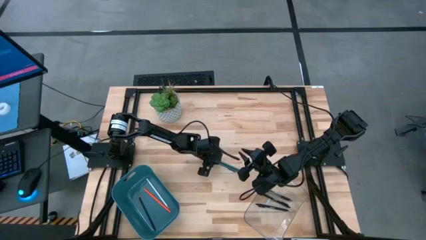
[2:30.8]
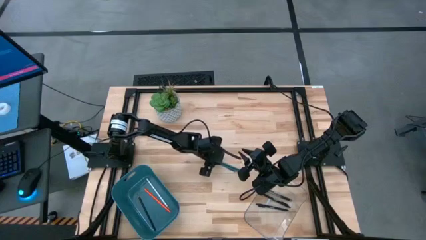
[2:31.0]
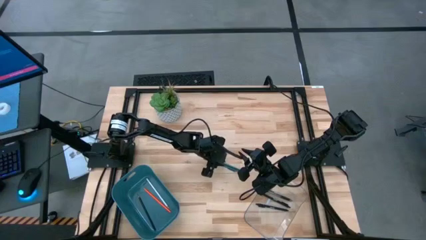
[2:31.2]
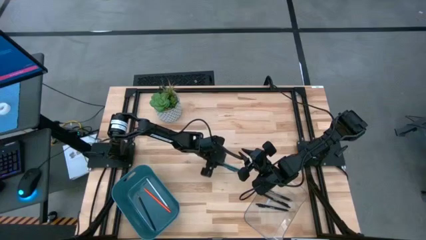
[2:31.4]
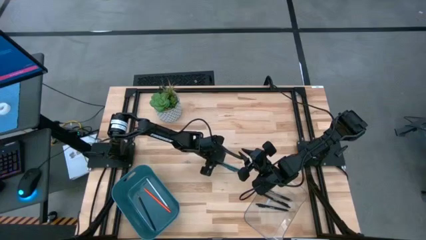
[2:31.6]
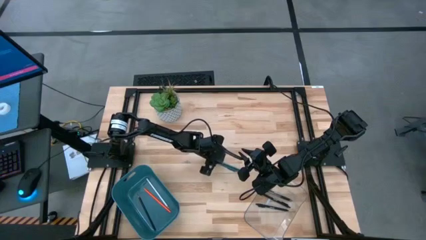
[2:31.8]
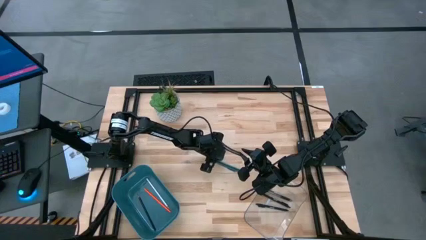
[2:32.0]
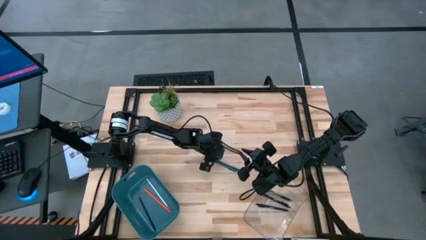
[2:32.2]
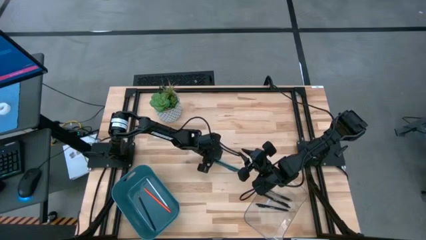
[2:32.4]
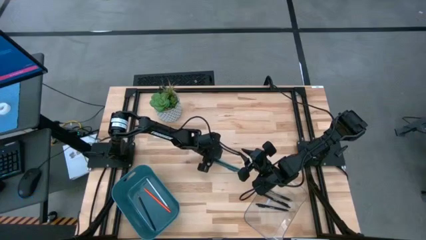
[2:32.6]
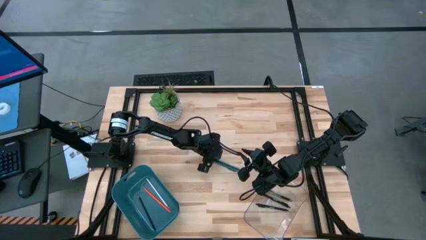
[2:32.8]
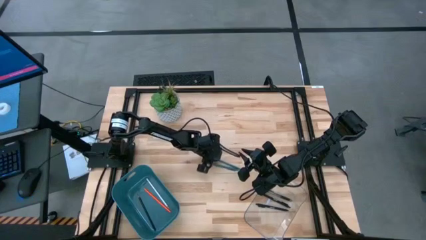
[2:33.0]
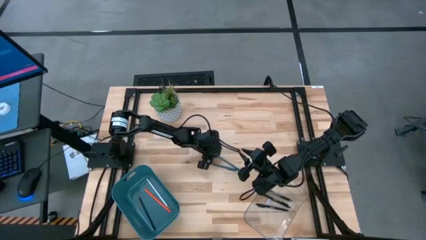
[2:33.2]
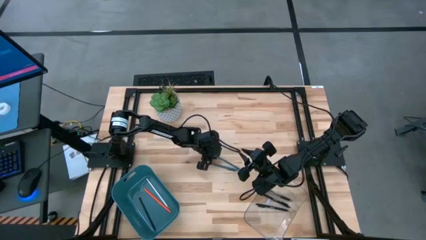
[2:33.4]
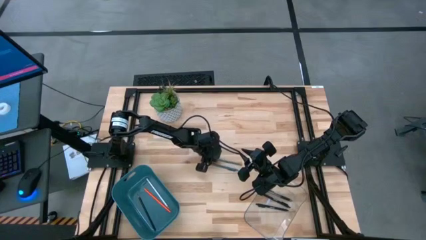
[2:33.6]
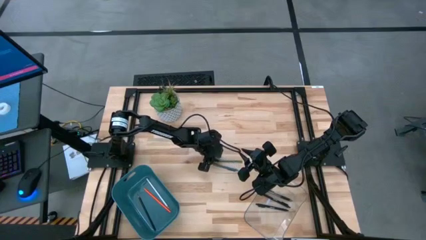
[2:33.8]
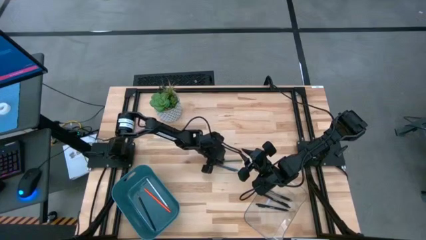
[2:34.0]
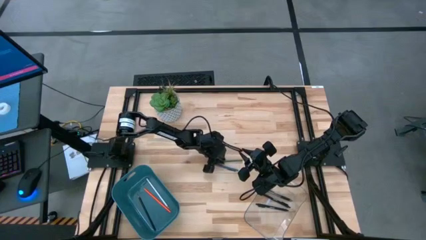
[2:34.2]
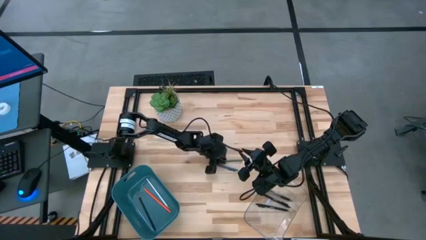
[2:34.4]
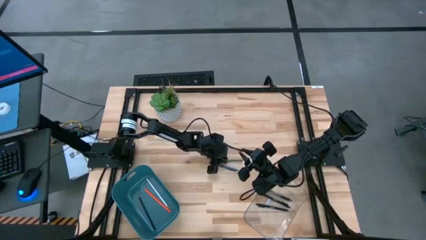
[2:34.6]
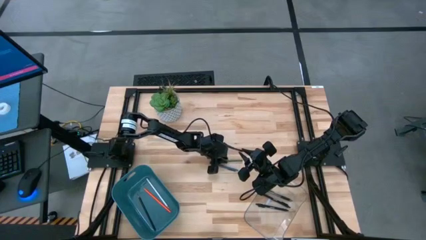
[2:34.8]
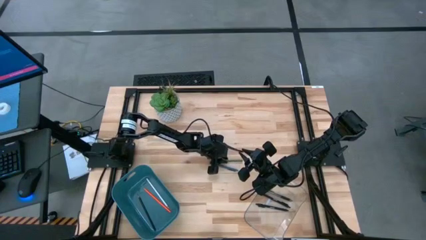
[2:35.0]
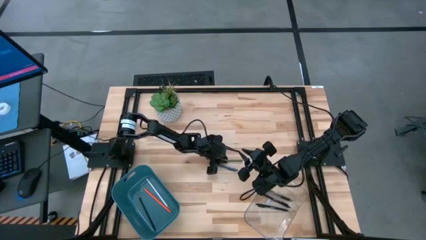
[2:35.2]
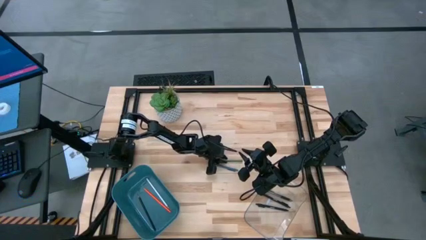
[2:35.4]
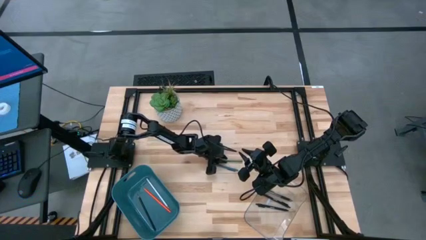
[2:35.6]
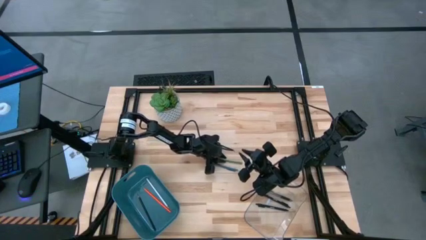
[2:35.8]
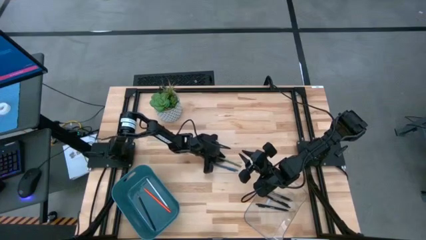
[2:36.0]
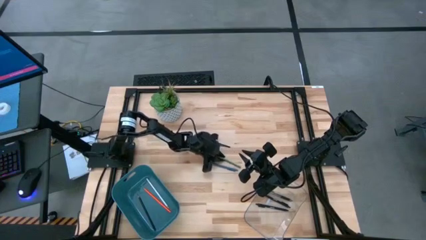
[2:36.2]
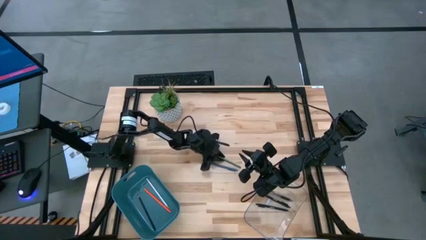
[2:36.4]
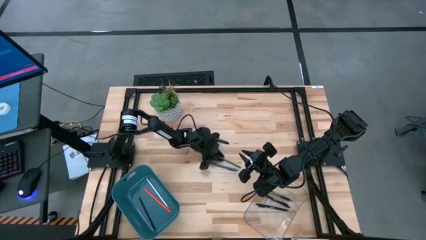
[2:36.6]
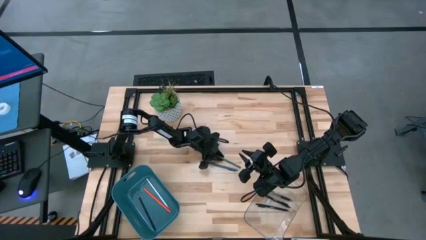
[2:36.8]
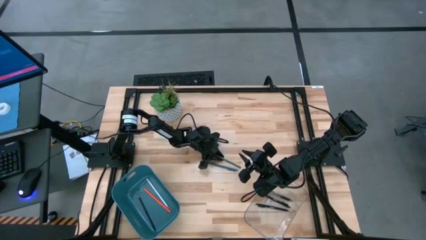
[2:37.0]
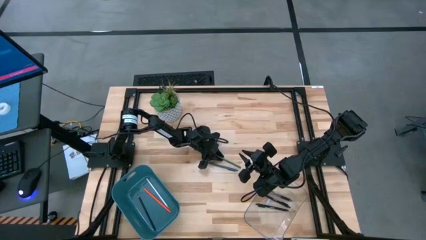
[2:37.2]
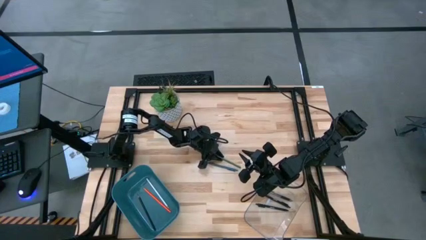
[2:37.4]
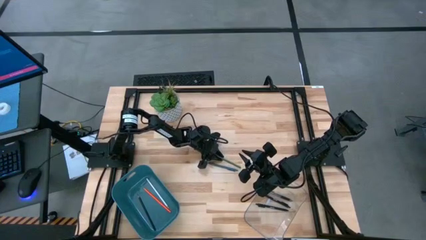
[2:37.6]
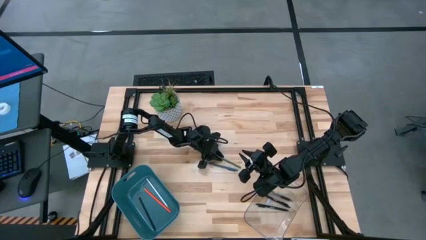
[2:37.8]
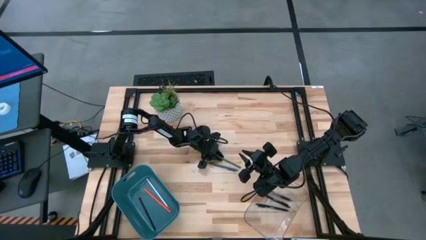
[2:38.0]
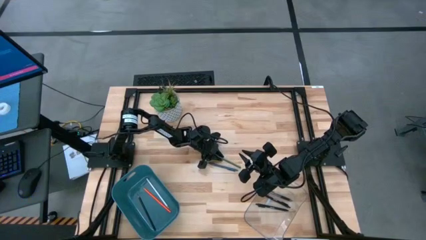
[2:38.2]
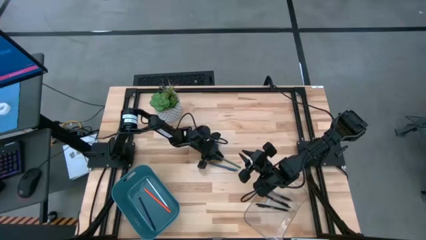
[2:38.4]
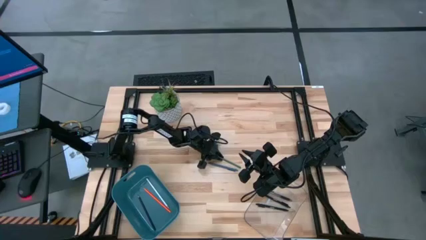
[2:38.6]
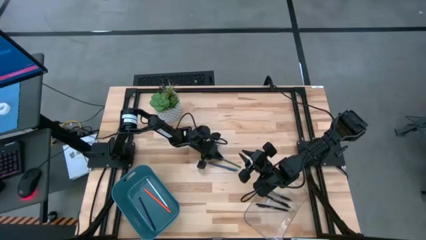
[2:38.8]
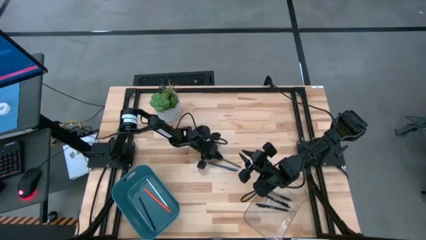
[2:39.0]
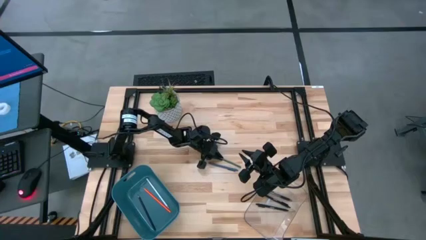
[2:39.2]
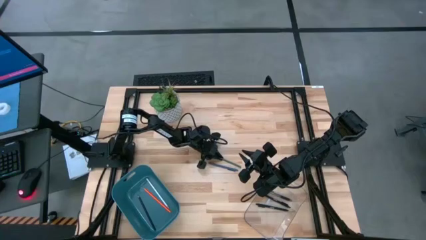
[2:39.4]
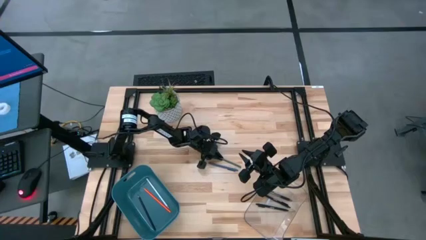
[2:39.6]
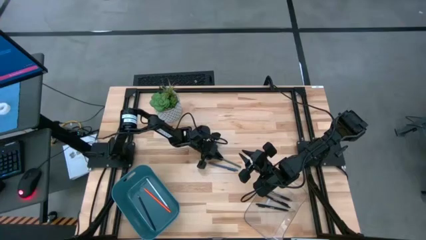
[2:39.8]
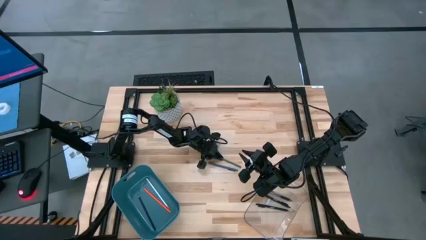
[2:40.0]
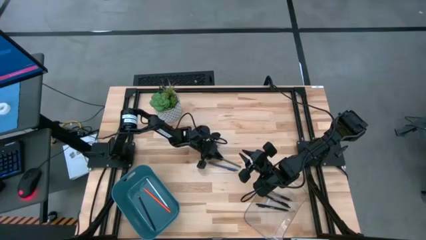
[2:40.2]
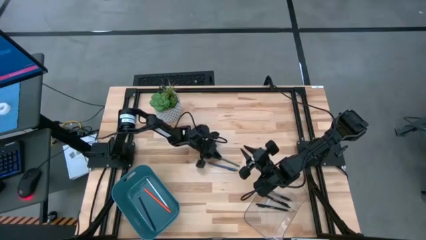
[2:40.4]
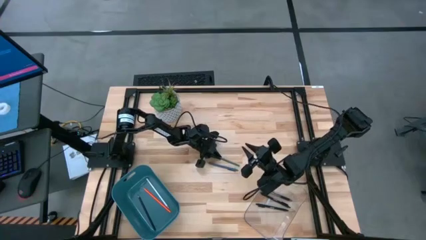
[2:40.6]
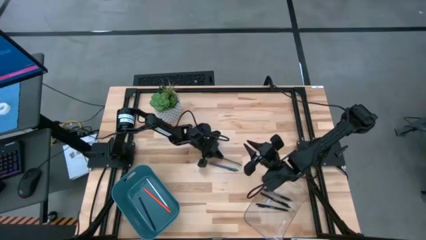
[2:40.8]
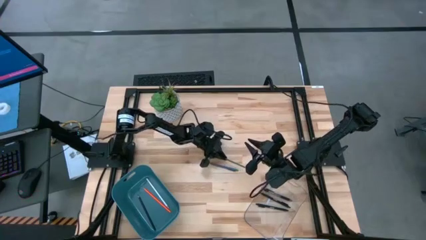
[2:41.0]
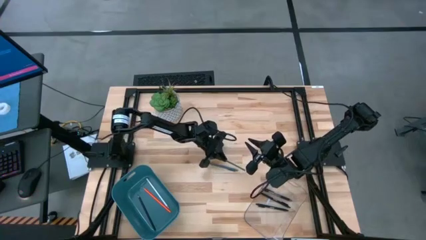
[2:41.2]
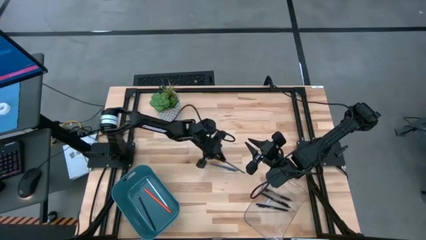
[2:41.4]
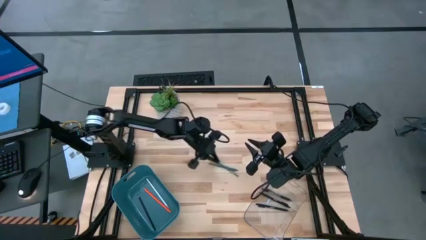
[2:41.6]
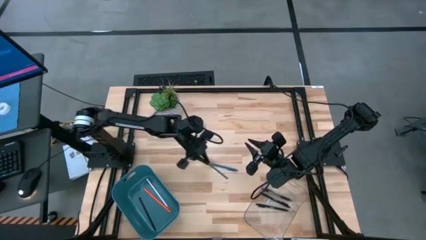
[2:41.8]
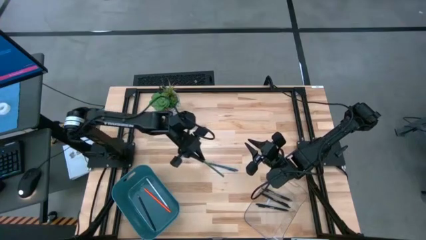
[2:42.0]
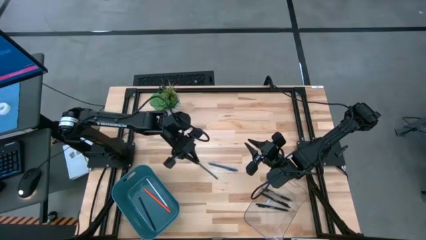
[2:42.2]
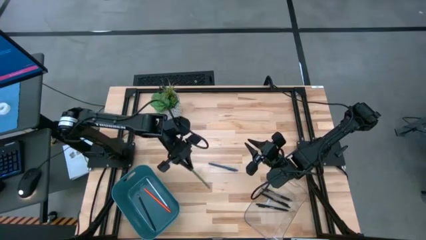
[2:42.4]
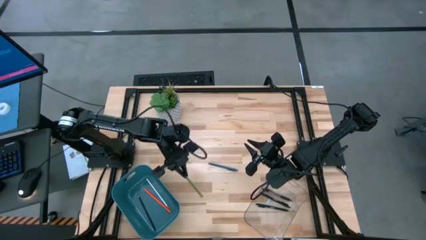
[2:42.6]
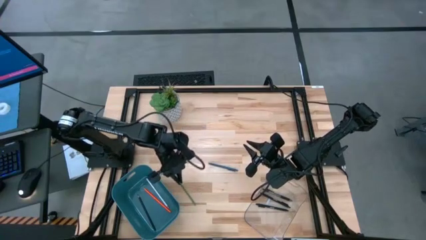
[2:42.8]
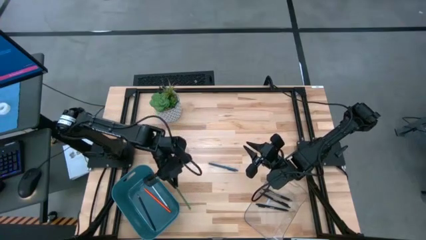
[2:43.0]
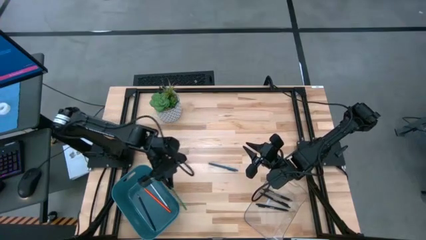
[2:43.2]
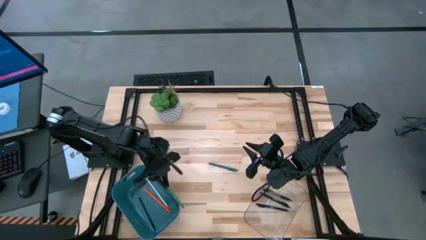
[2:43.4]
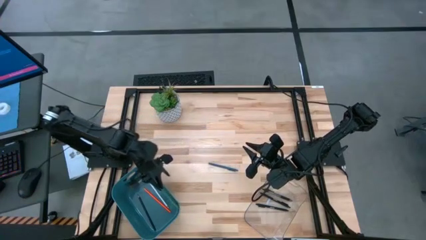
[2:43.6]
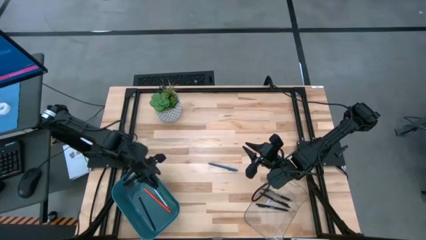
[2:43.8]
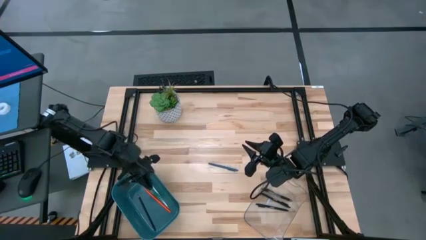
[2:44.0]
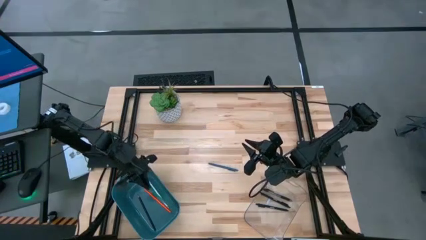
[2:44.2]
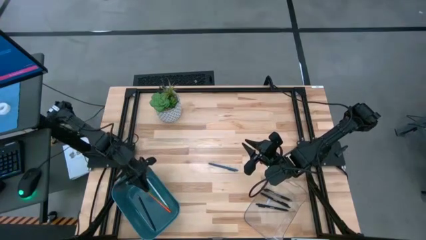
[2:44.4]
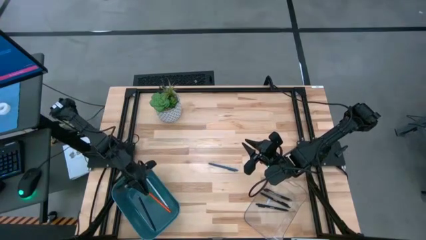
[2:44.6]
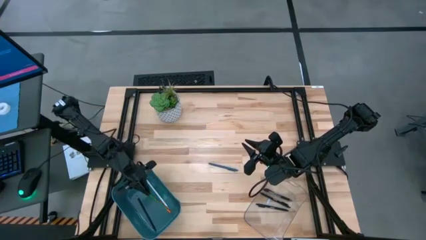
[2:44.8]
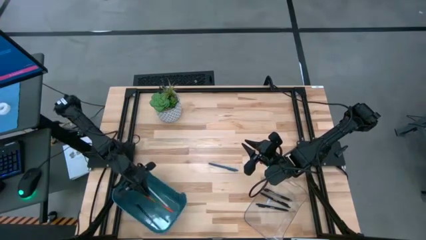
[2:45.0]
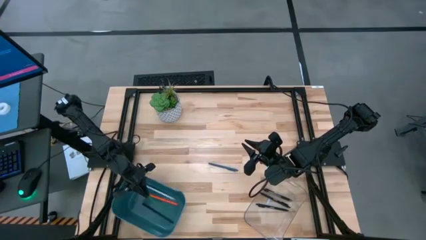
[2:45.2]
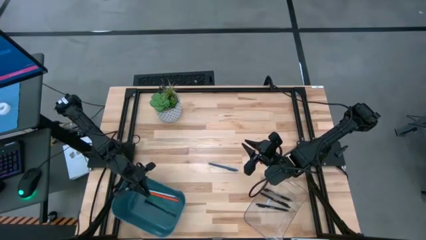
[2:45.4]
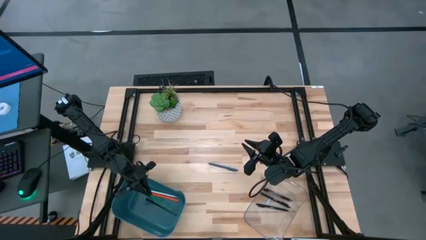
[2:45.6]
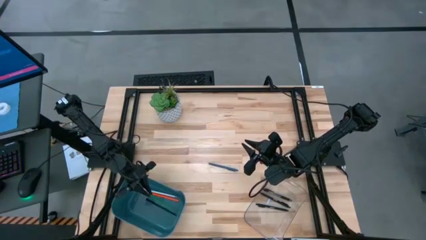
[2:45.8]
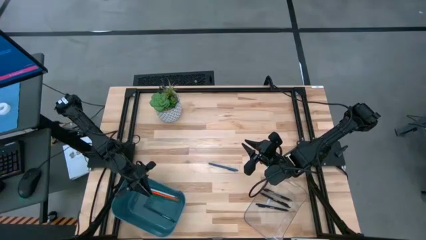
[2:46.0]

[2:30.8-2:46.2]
Task: Sort pens & pencils
Put the green pencil into the blue bin
